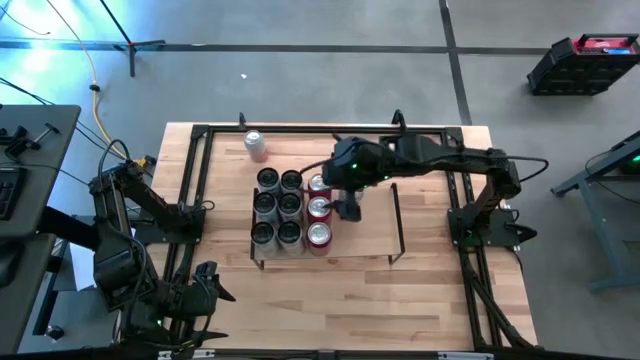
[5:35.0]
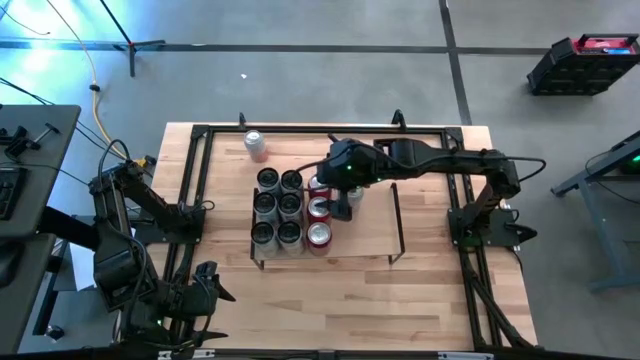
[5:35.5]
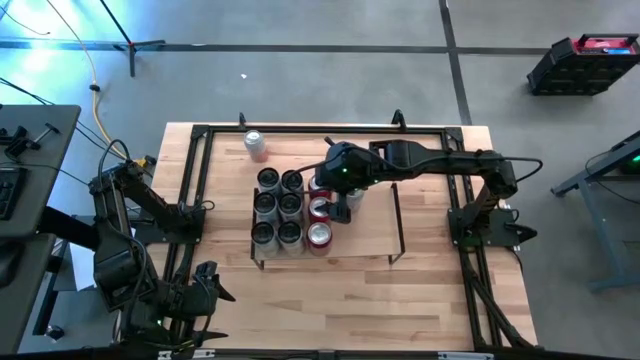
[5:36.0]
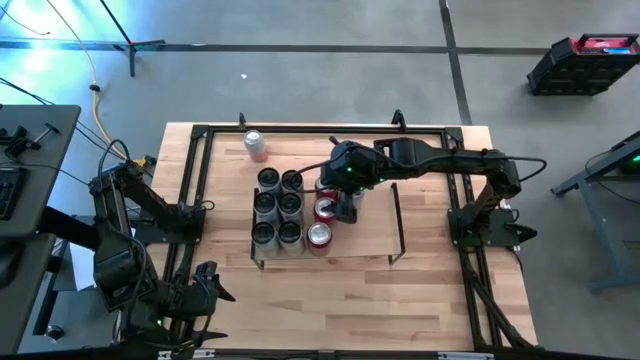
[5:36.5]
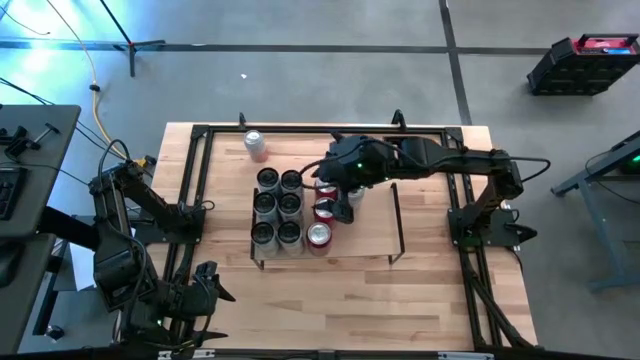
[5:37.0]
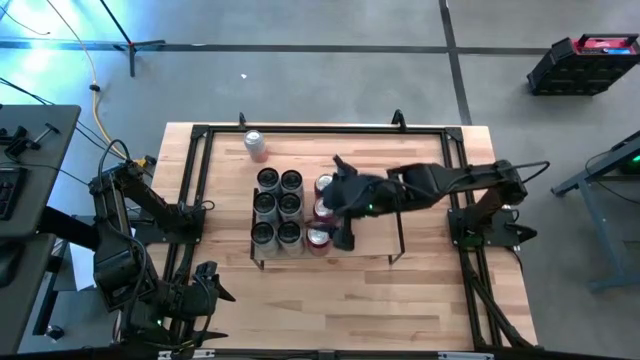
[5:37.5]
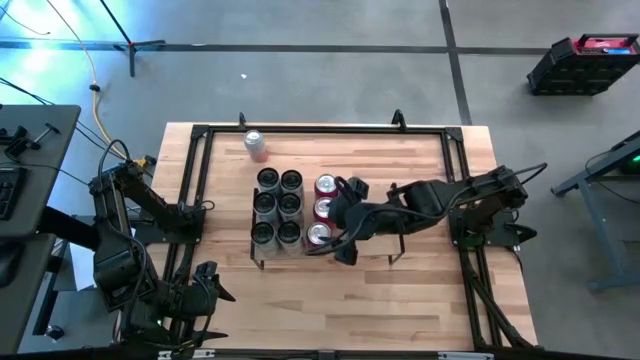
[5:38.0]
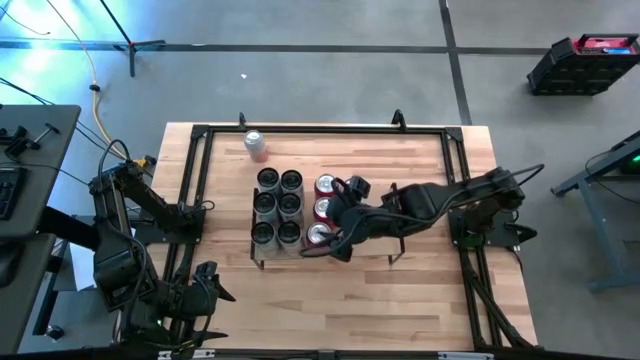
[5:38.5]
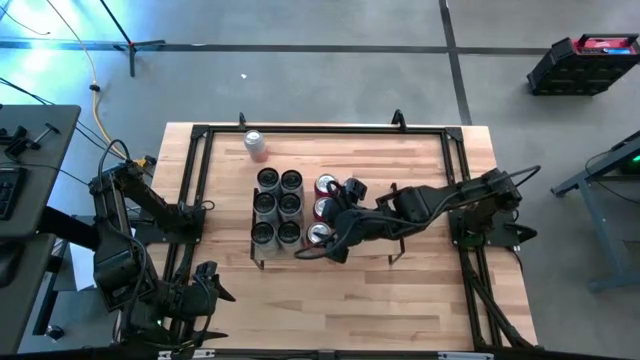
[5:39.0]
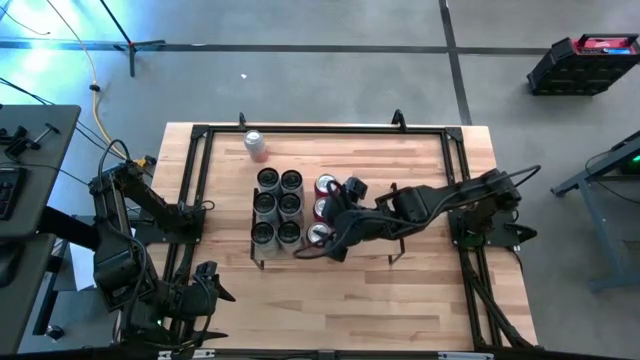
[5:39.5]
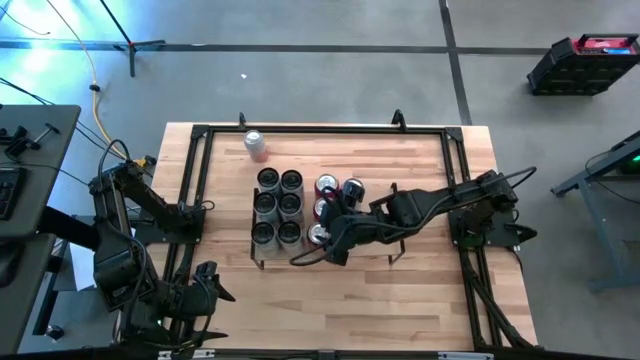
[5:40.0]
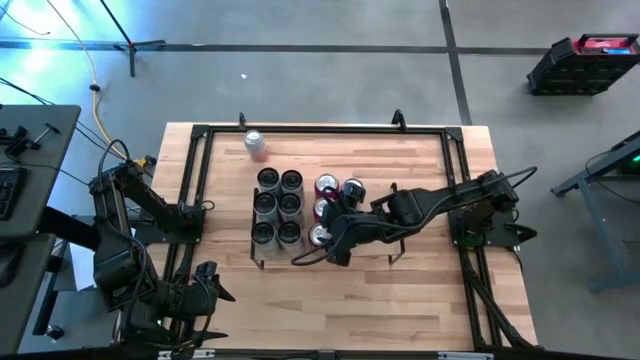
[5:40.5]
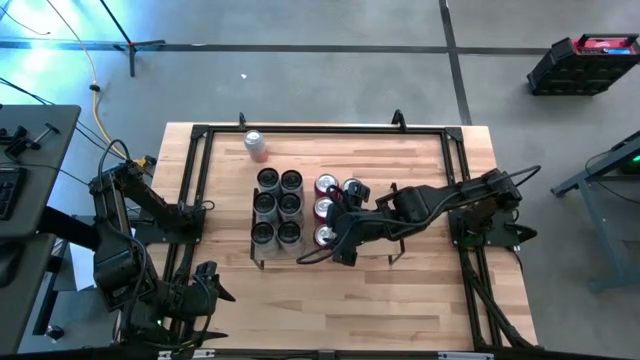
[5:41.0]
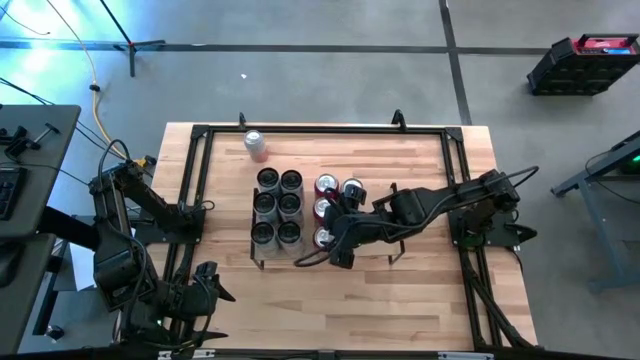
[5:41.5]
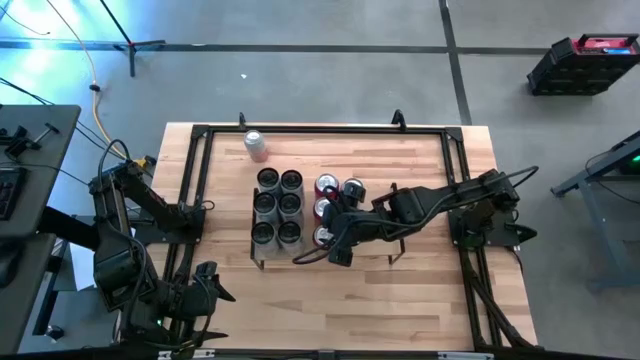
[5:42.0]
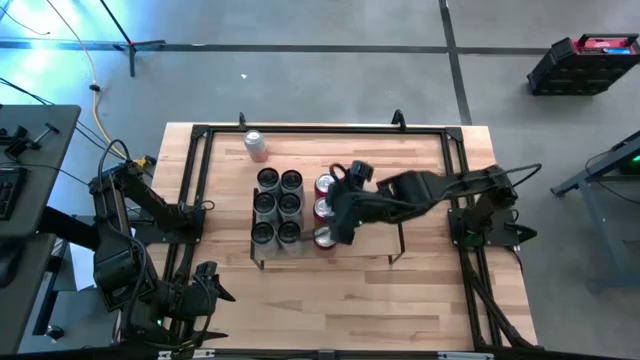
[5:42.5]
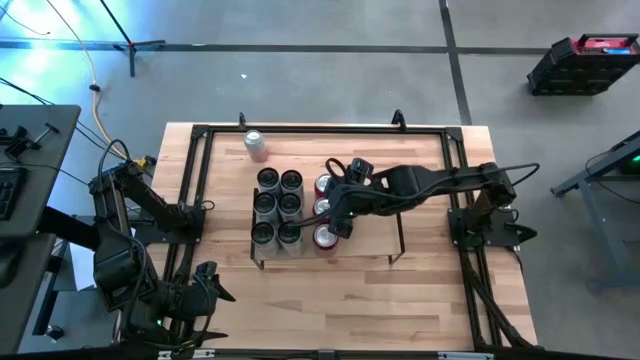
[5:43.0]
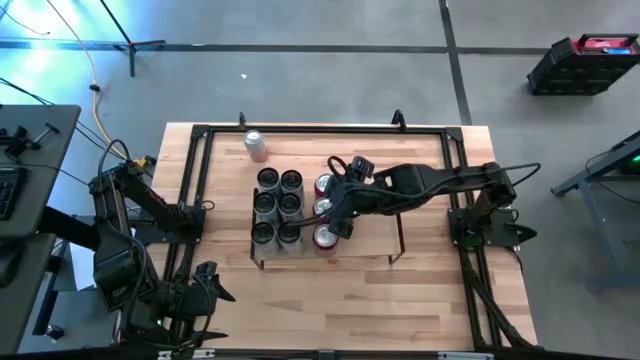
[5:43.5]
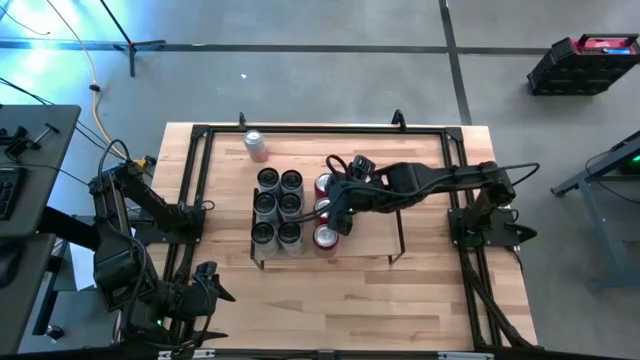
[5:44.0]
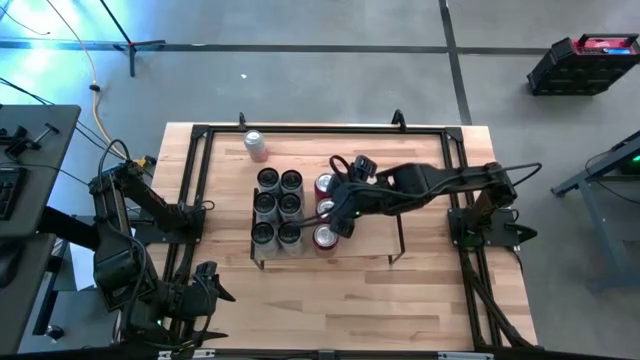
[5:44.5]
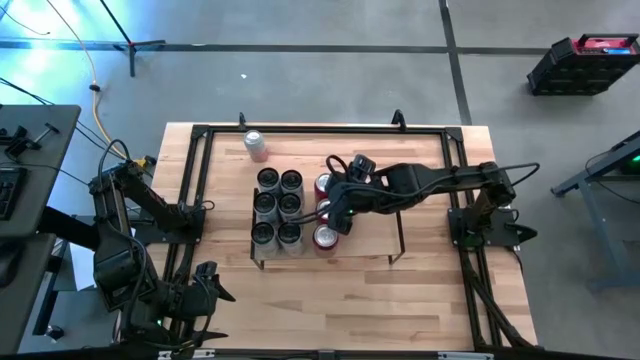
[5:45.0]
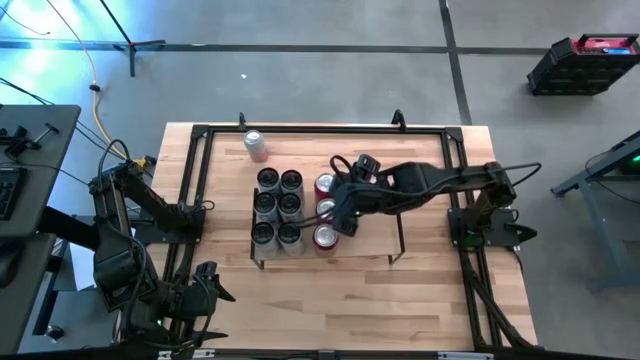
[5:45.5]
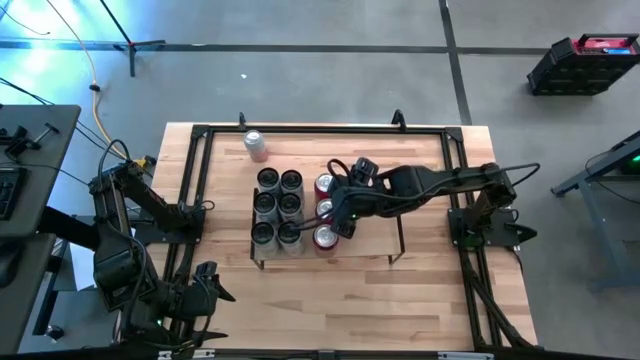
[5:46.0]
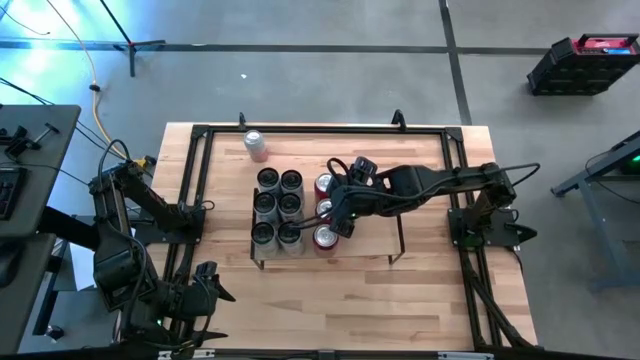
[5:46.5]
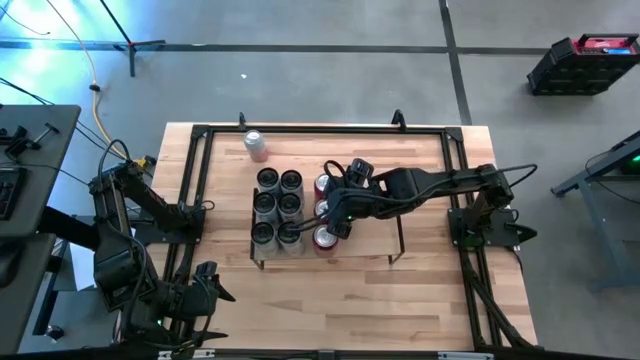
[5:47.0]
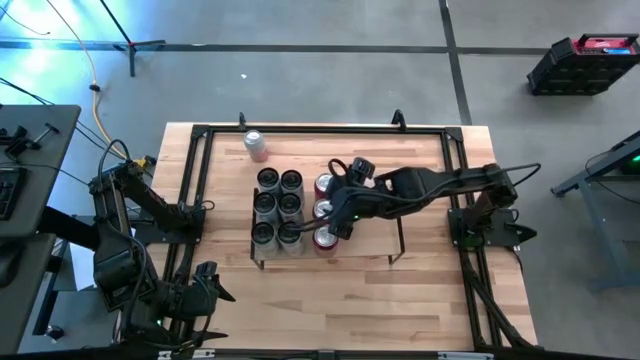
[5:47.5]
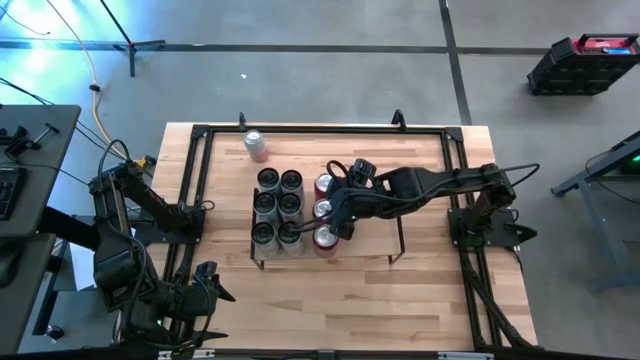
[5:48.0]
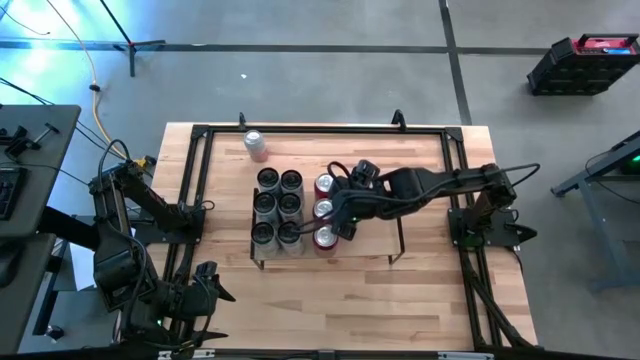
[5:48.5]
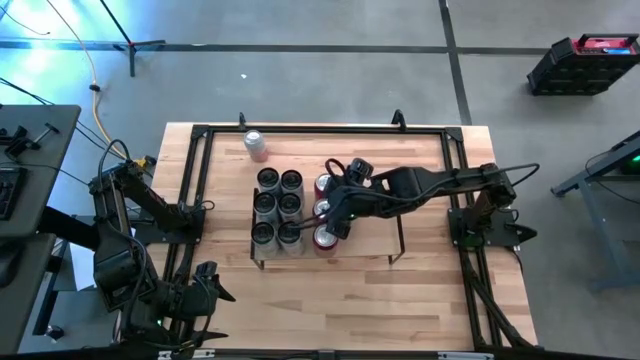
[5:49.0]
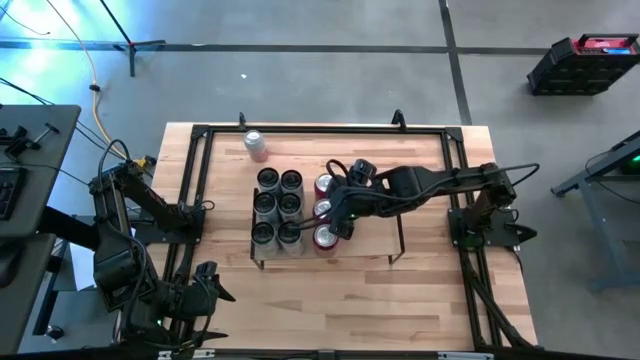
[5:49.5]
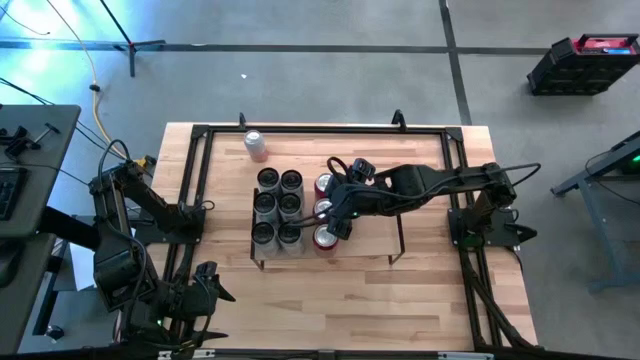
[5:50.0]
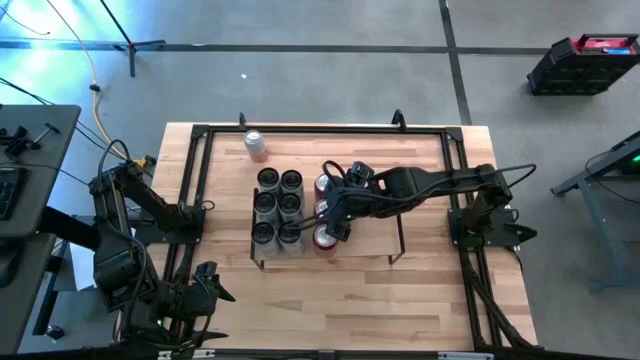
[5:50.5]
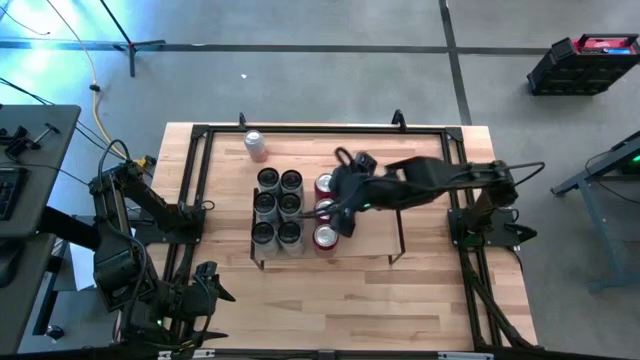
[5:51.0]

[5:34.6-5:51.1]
Task: Place canned beverage on shelf
Adjust the red soda cans on the shelf

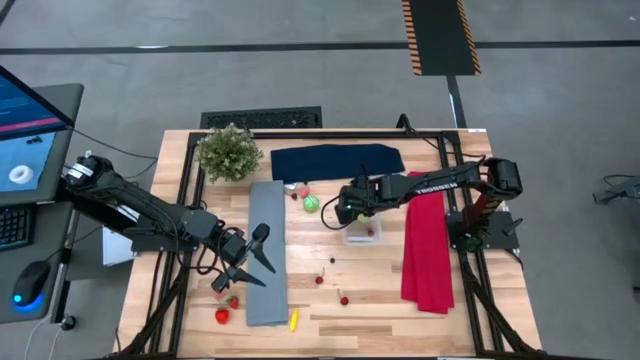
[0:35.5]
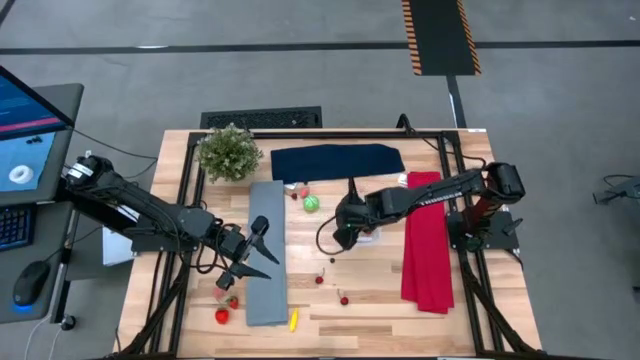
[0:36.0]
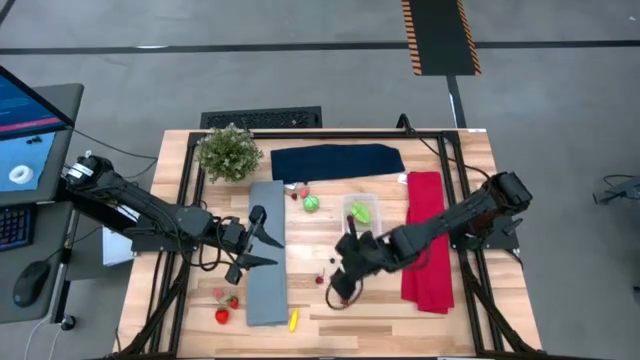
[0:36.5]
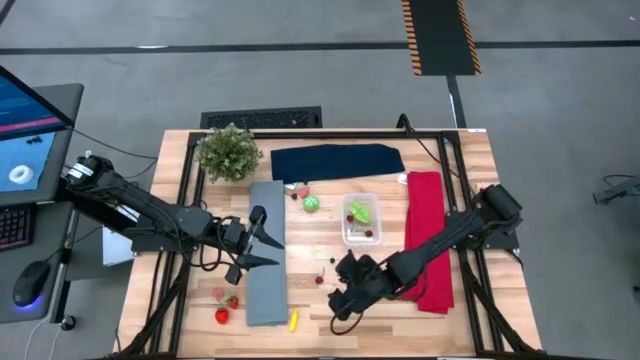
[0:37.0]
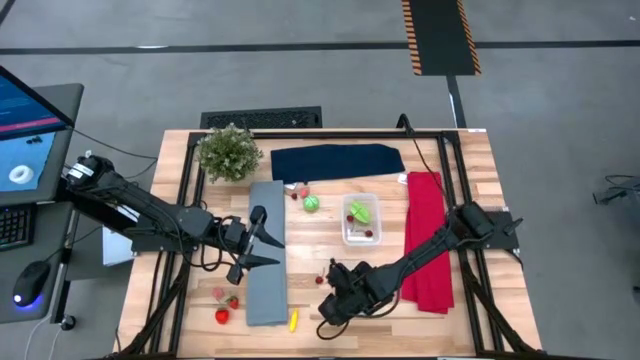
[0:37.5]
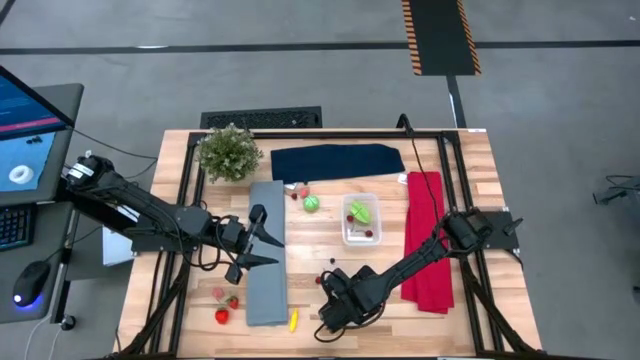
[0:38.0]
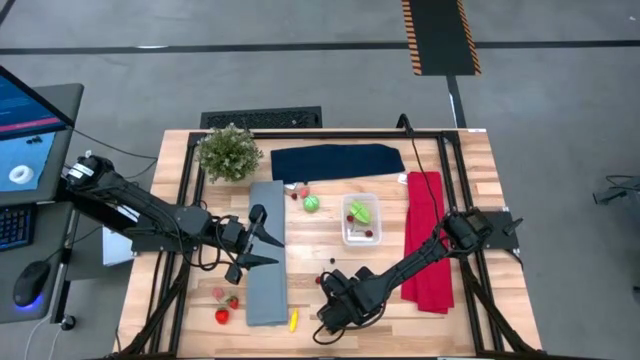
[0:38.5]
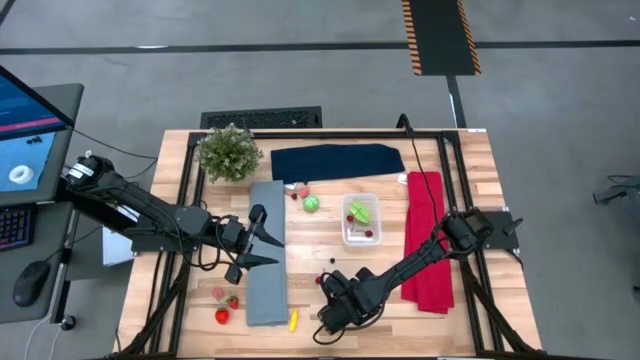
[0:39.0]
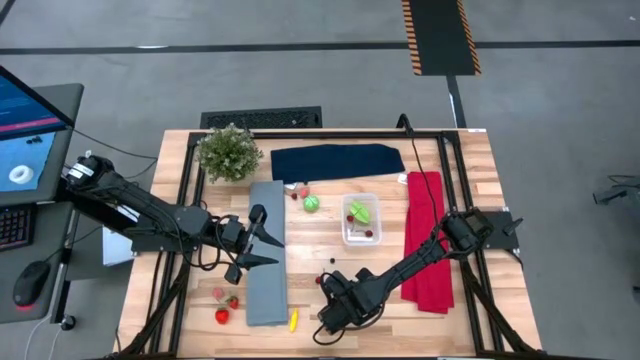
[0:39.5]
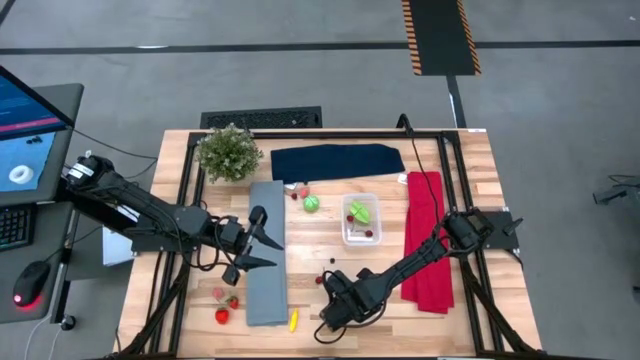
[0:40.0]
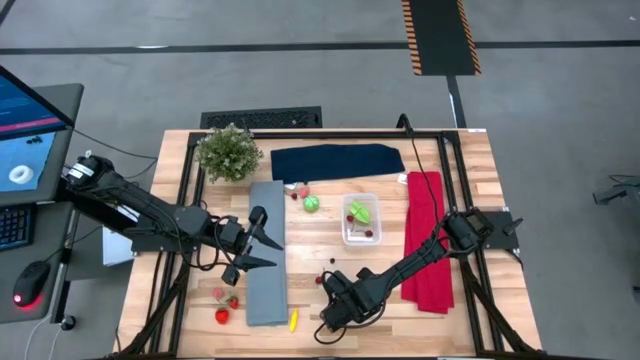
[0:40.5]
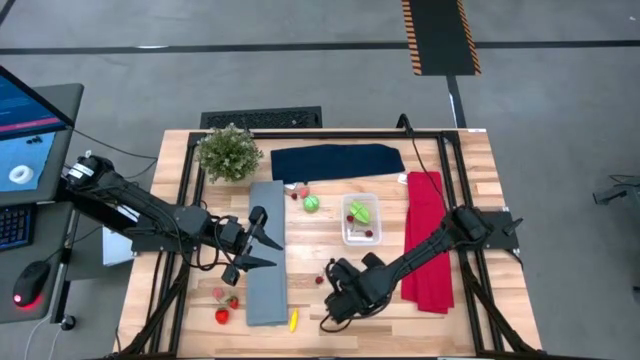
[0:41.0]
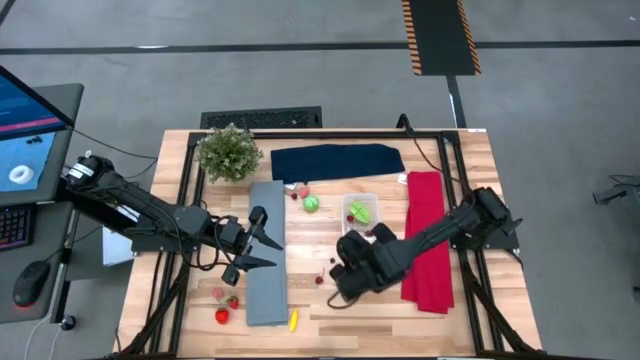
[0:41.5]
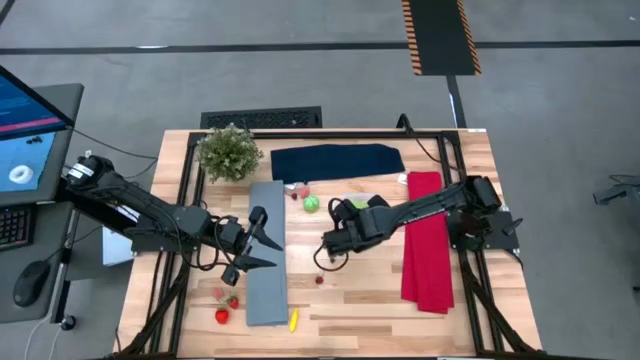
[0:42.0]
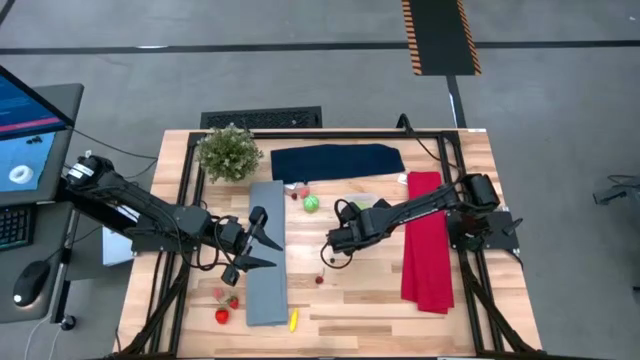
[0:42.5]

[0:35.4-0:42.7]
Task: Pick and placing Produce into tupperware
Put the red cherry into the transparent bin
